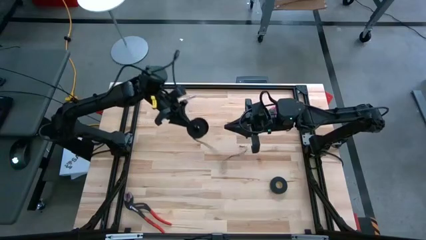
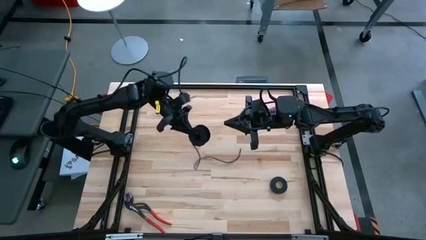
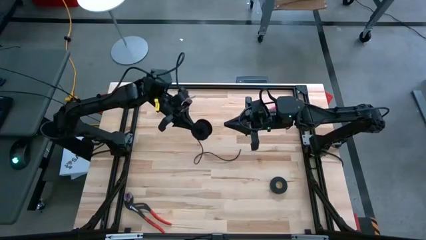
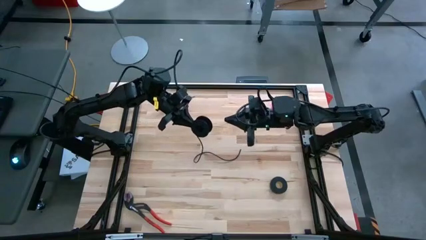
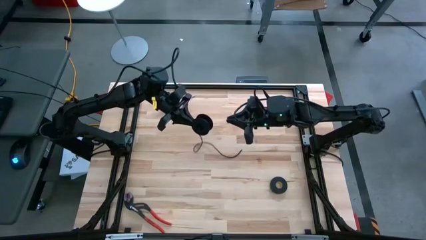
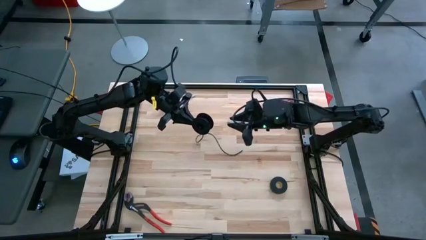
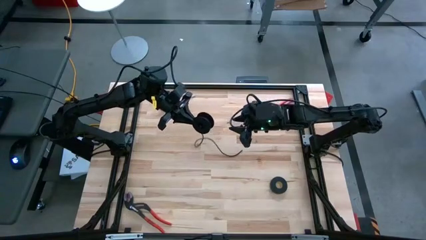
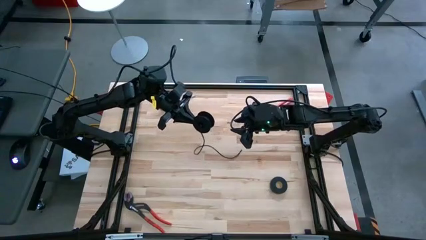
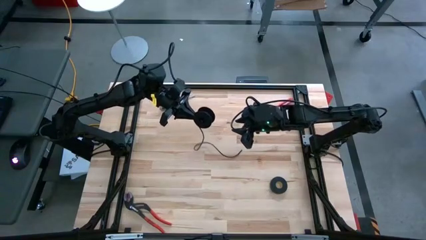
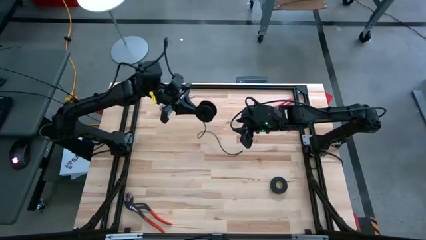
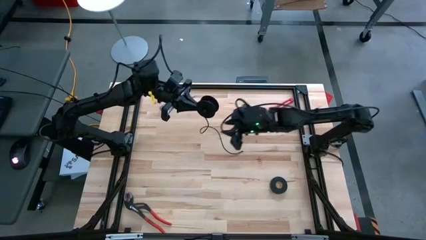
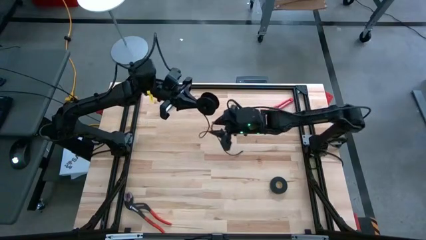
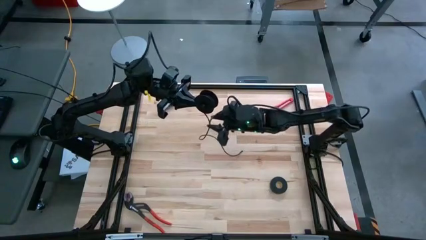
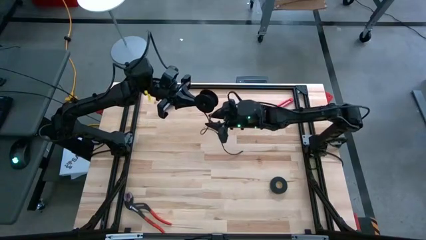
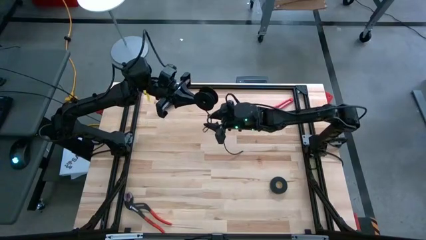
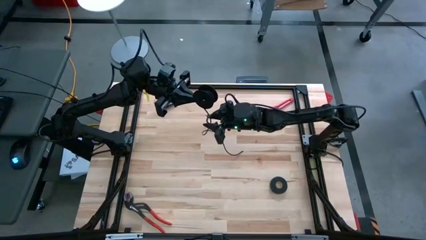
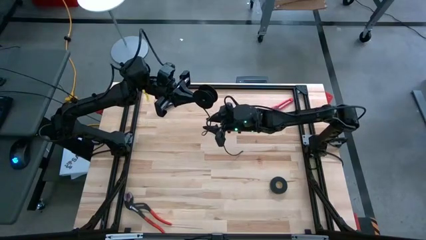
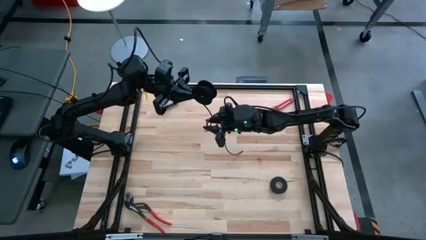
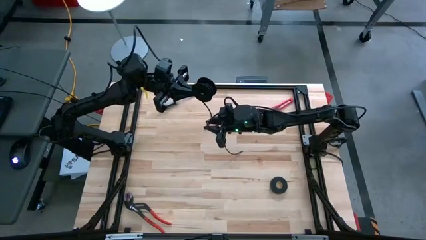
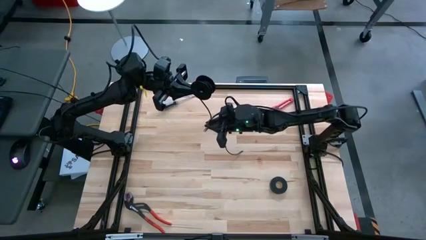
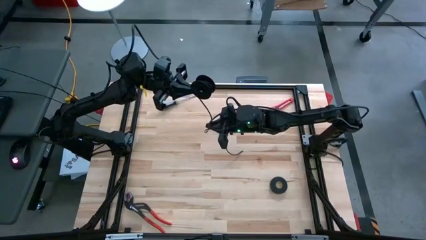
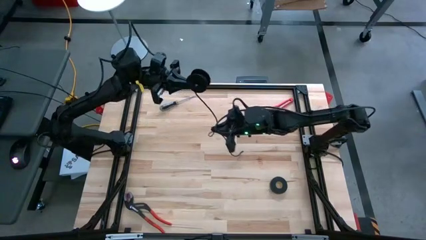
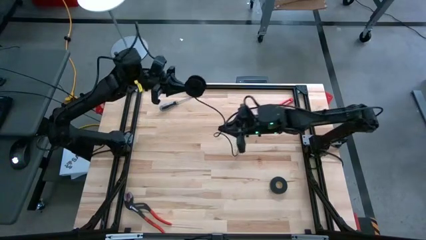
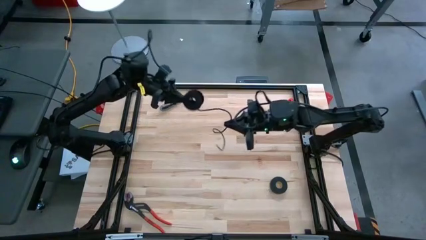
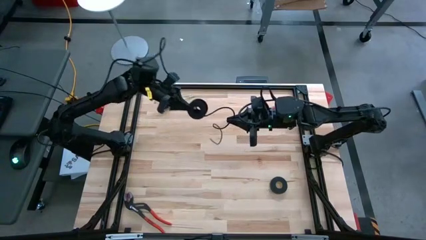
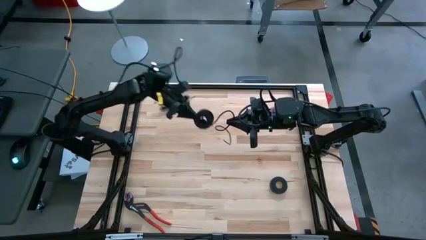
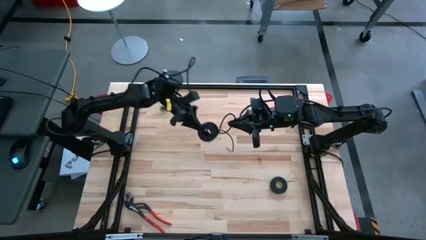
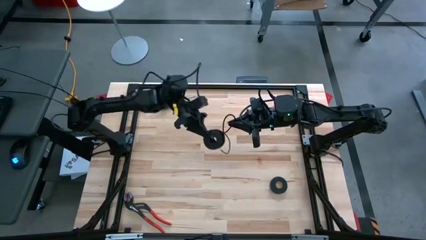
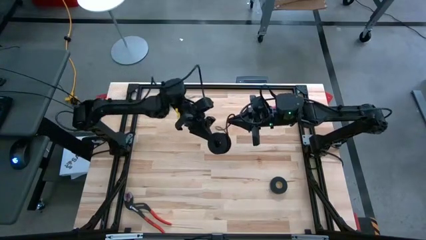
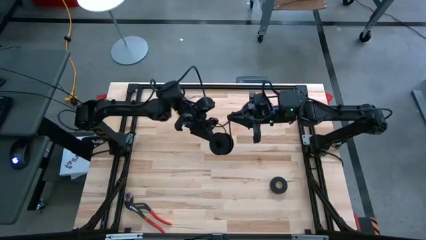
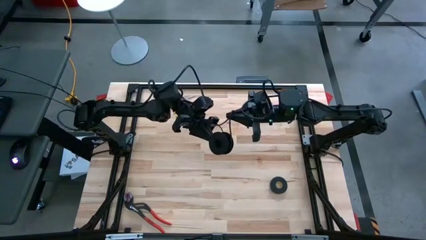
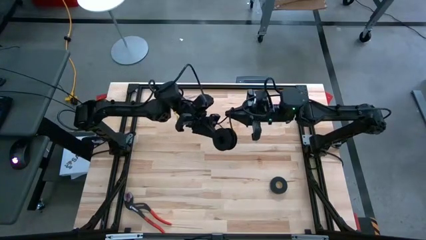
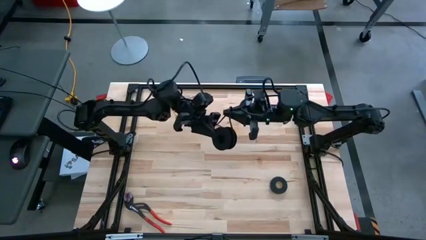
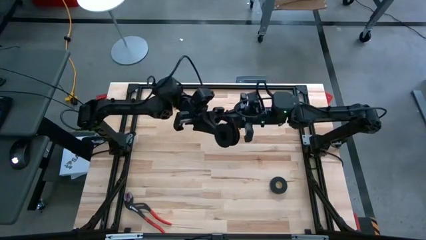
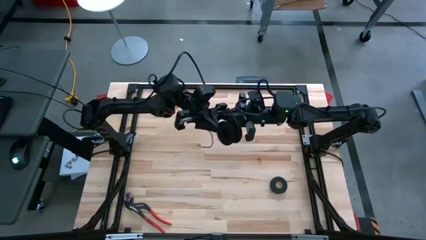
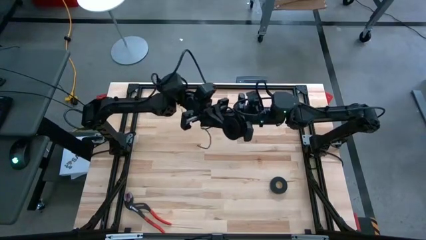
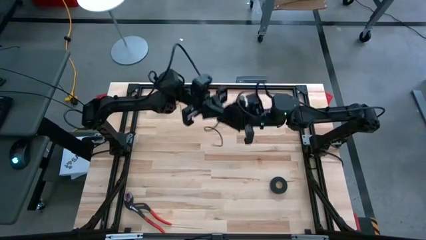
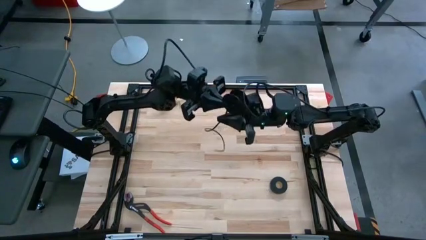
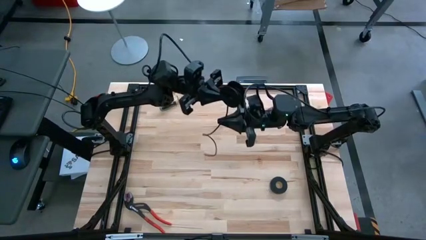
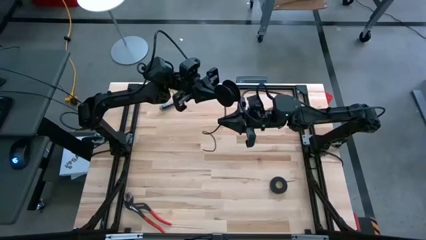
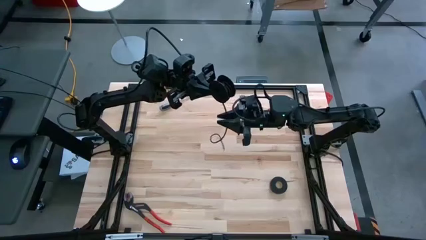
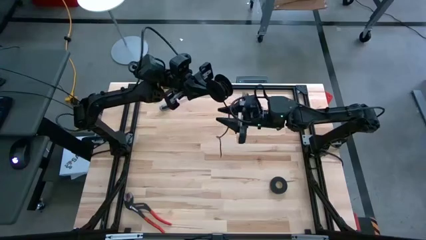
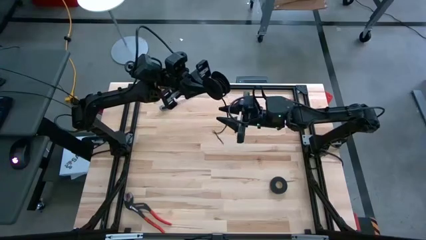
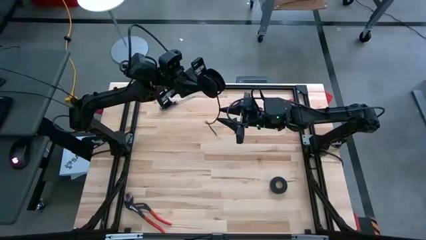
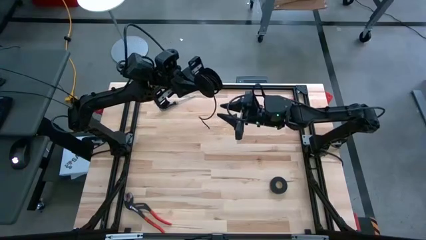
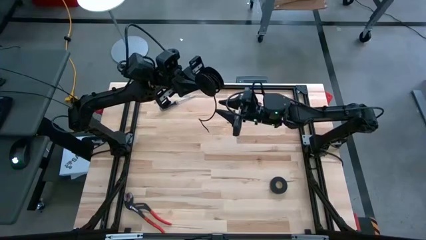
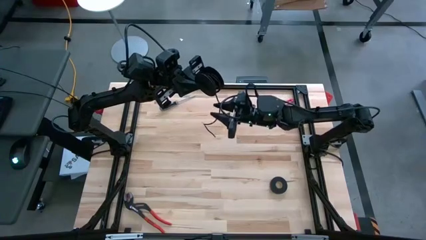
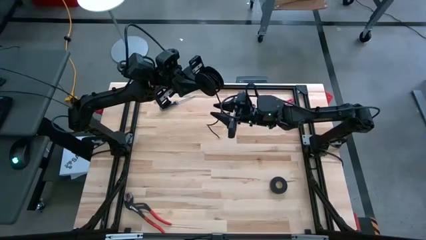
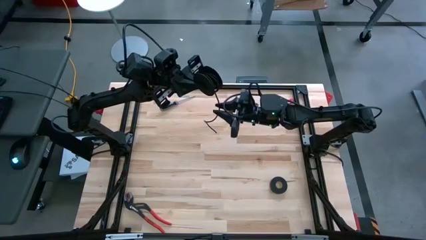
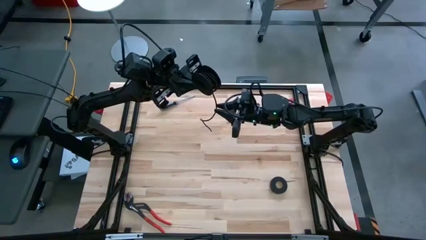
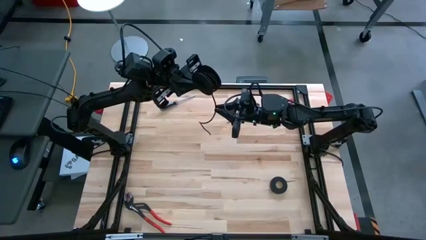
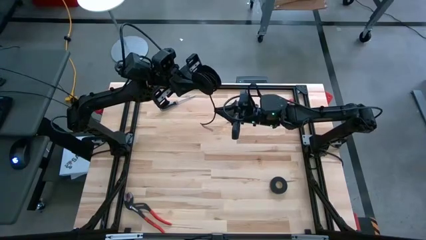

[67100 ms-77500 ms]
Task: Coil cords
Coil the black wire on the black spool

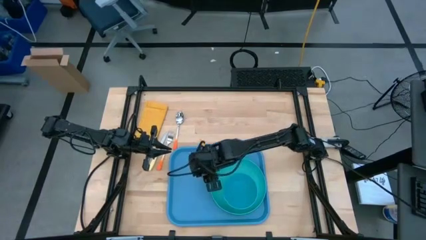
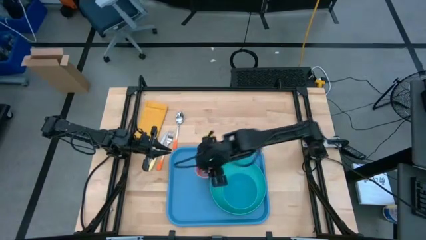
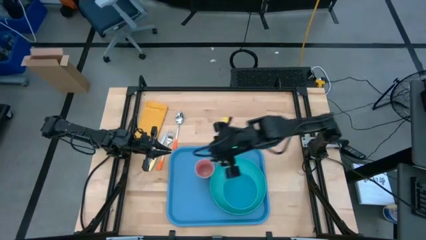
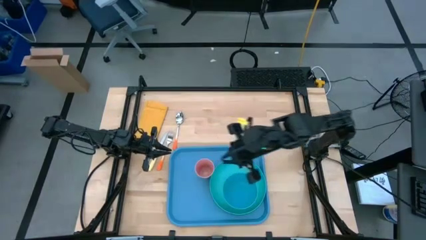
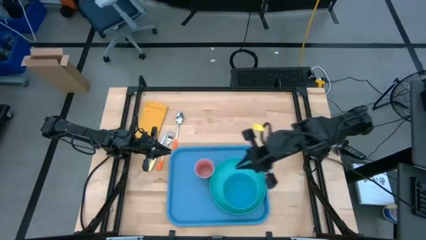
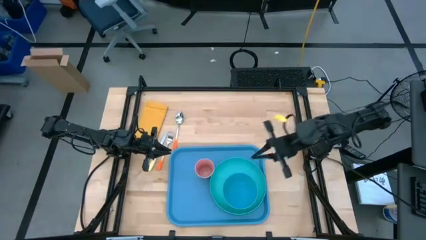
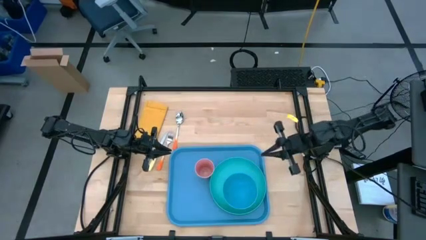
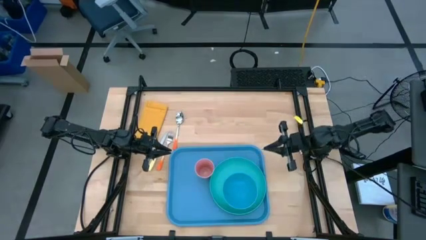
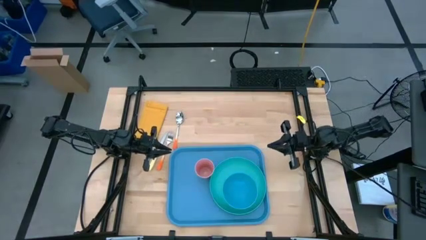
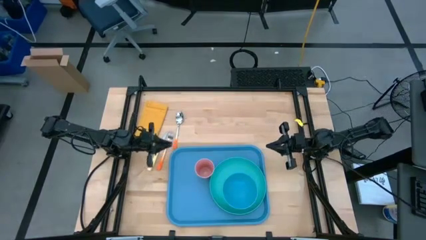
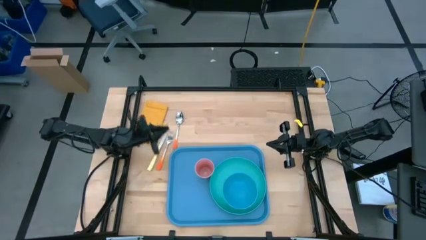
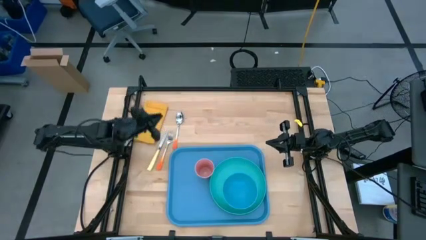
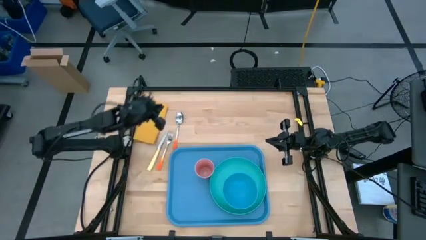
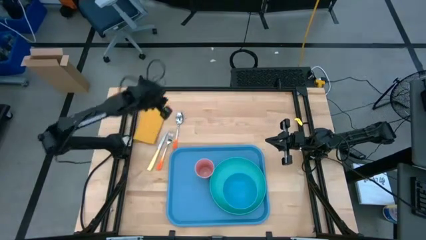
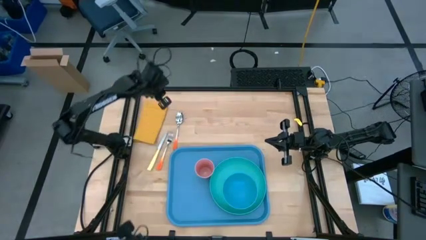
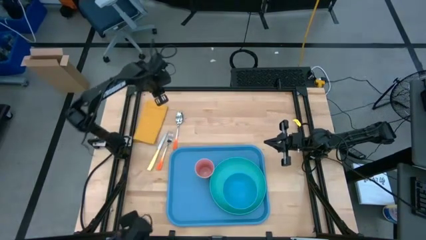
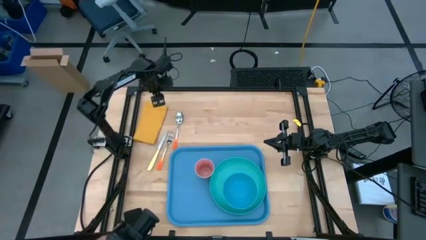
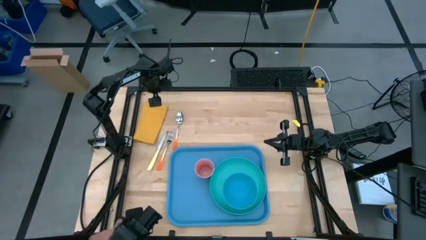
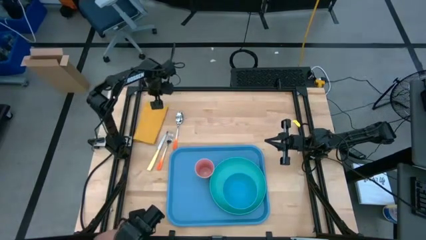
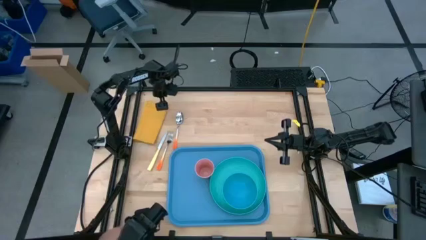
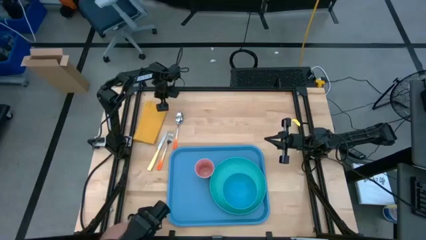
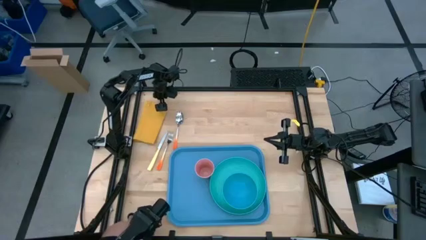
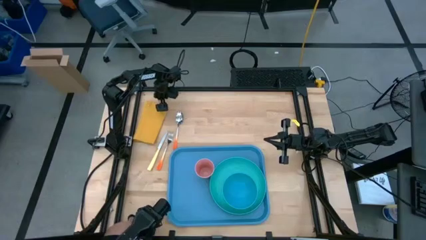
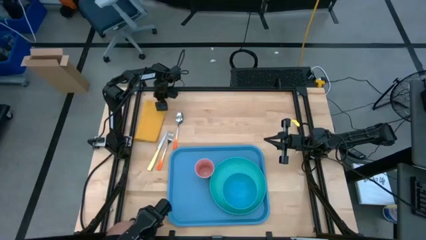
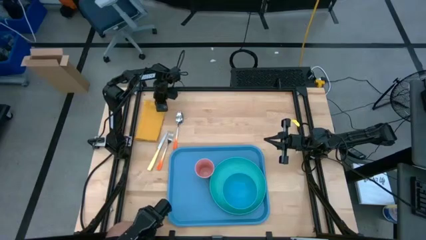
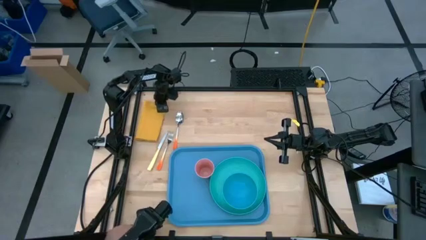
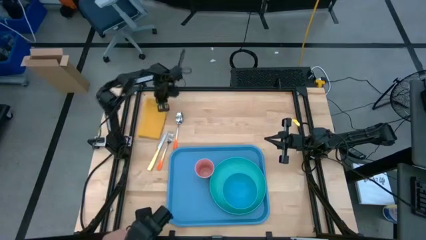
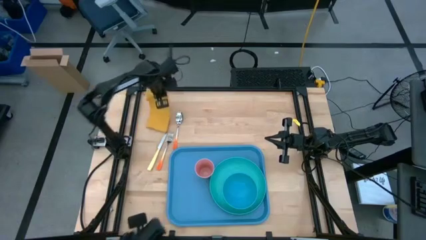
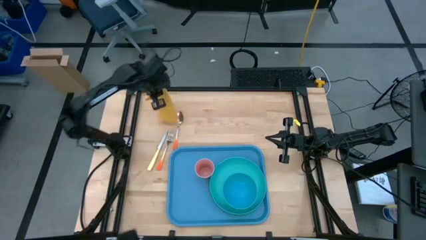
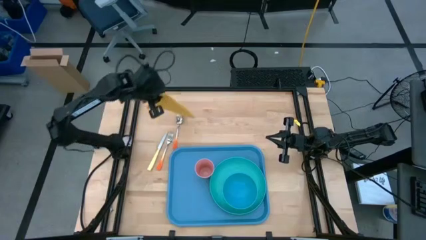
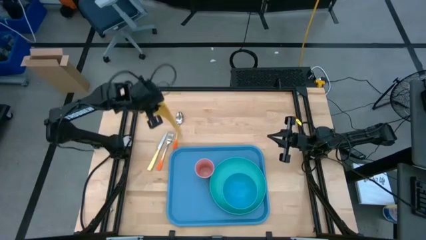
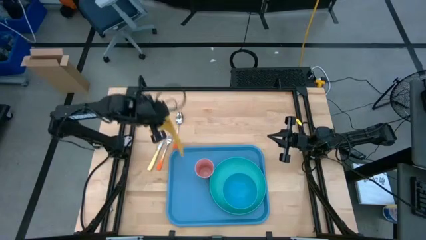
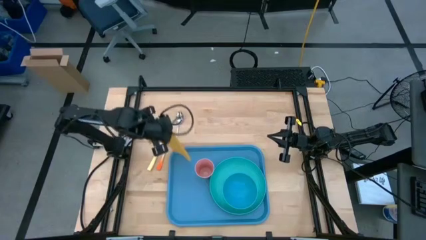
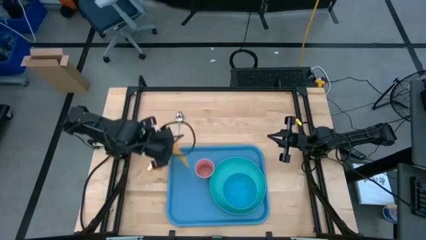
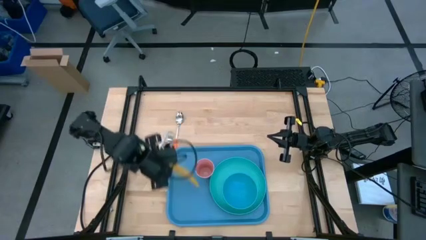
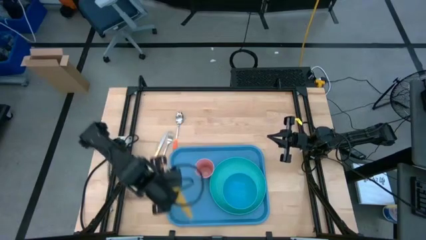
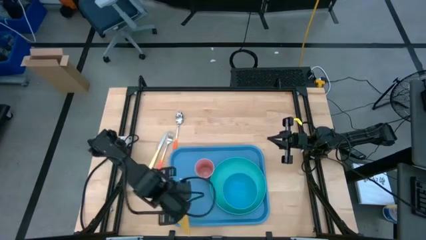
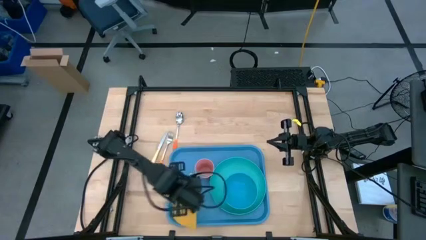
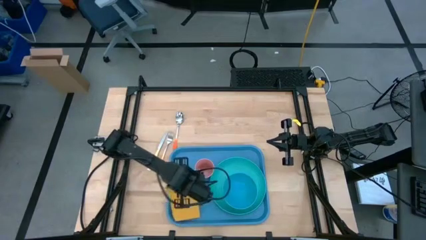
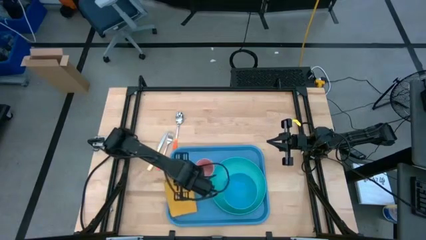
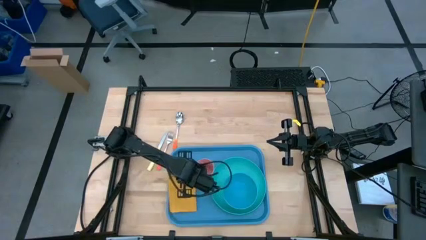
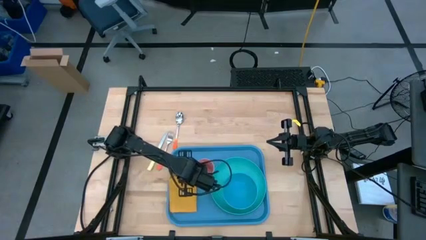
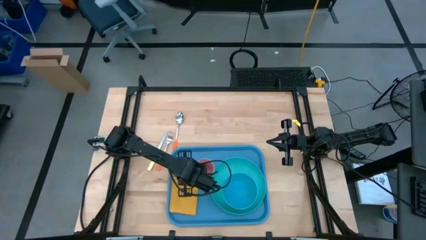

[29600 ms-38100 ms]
Task: Set up tray
Put the yellow table napkin on the left side of the light blue plate and pink cup on the blue serving tray
